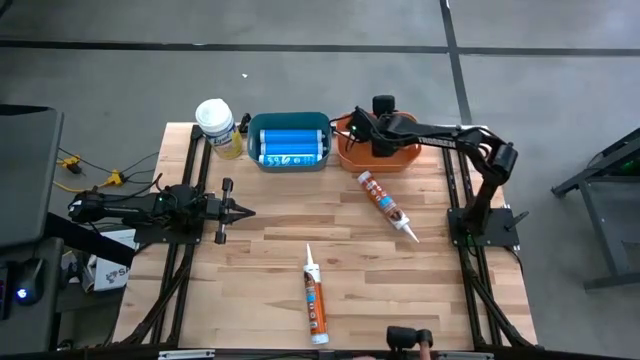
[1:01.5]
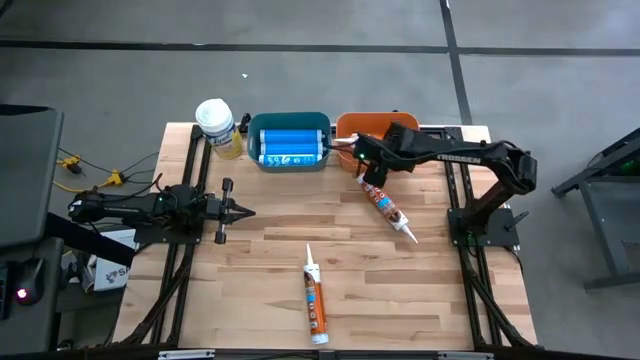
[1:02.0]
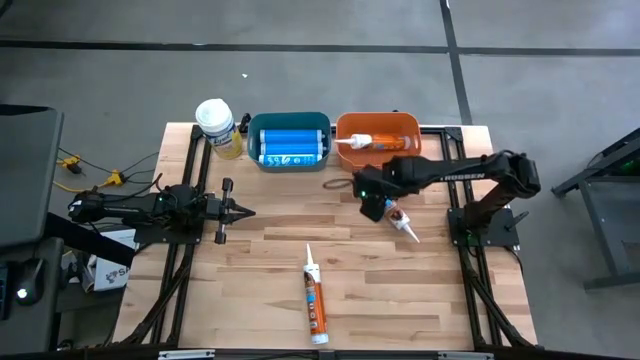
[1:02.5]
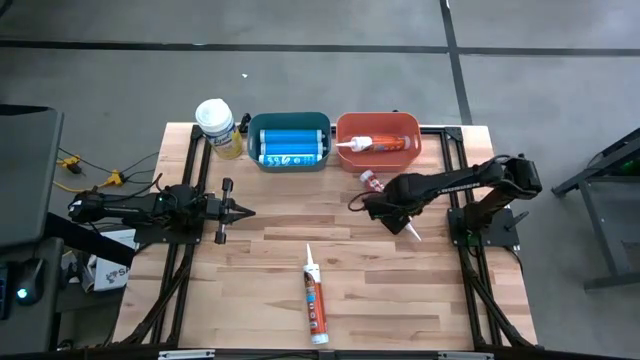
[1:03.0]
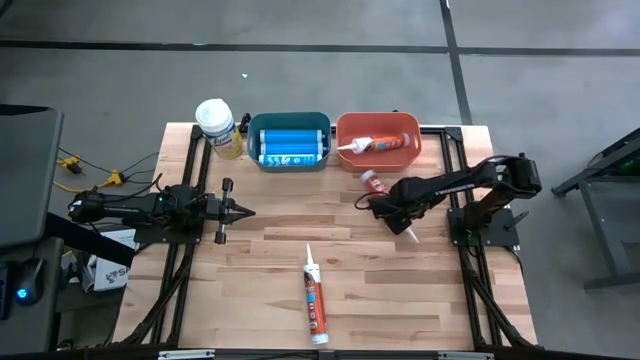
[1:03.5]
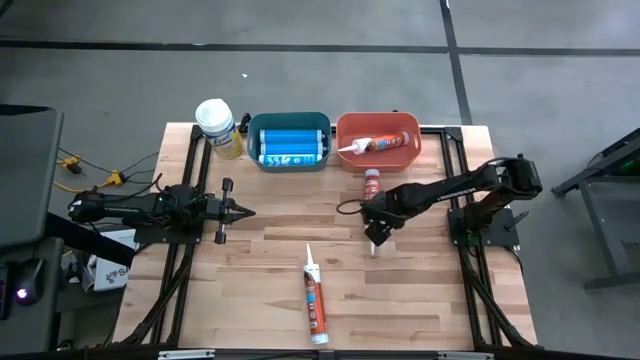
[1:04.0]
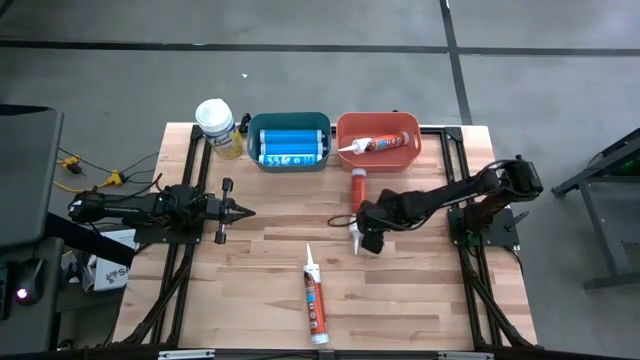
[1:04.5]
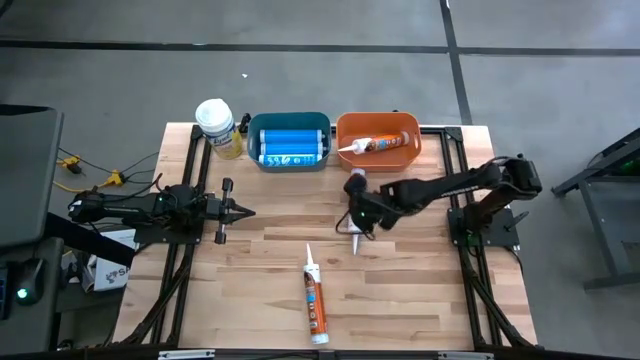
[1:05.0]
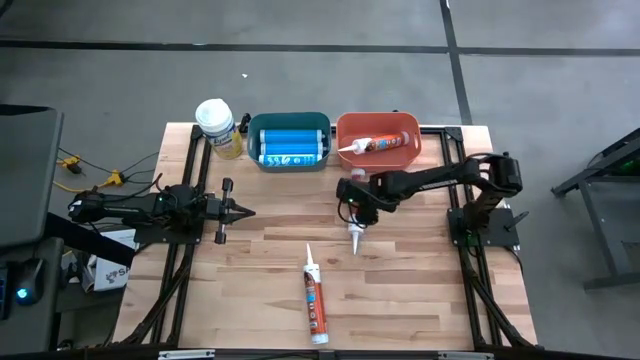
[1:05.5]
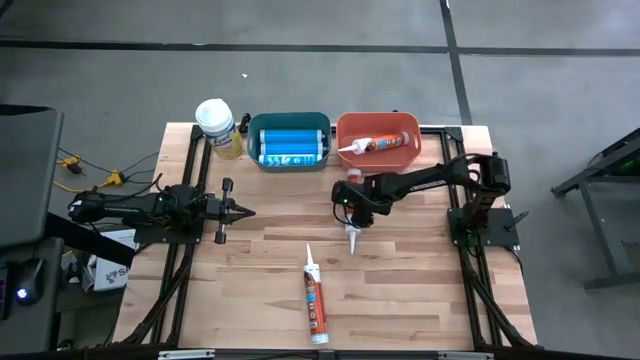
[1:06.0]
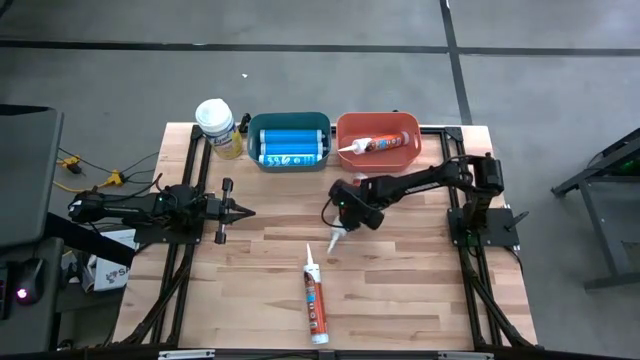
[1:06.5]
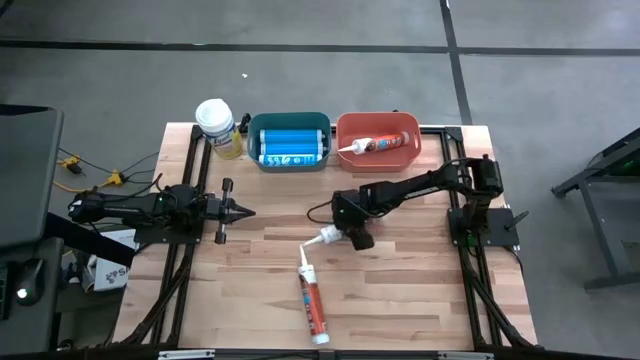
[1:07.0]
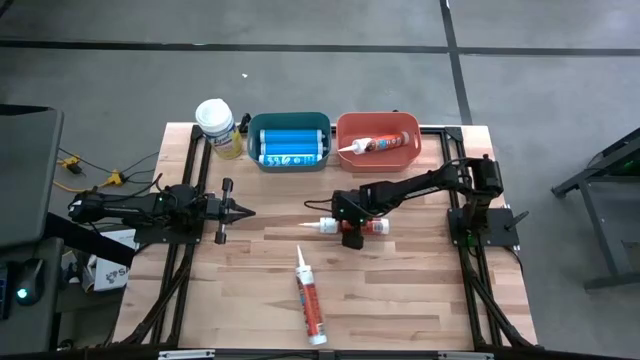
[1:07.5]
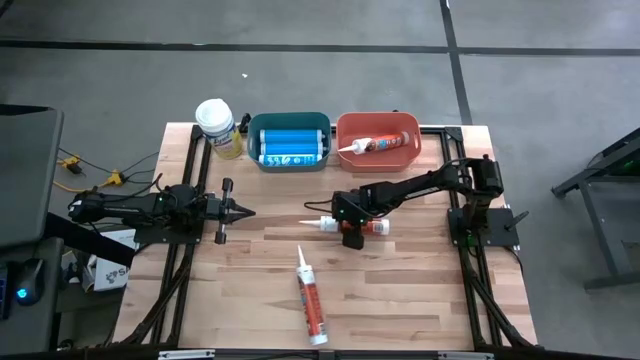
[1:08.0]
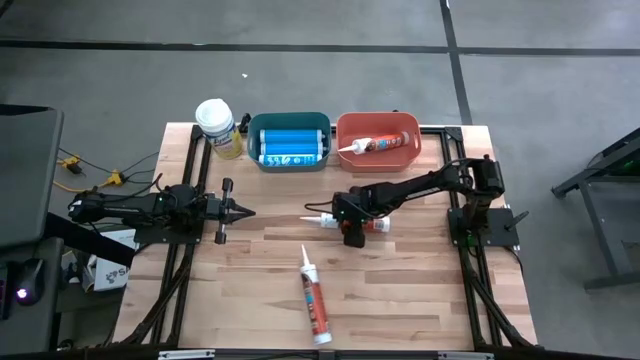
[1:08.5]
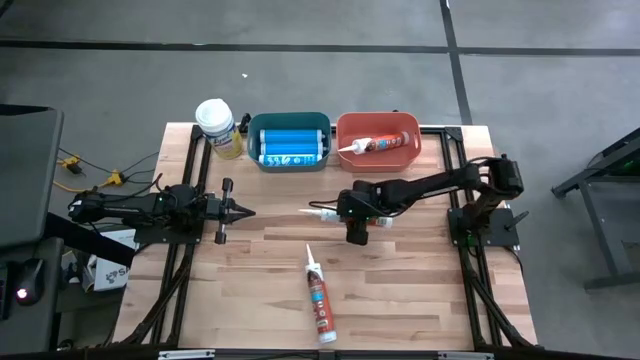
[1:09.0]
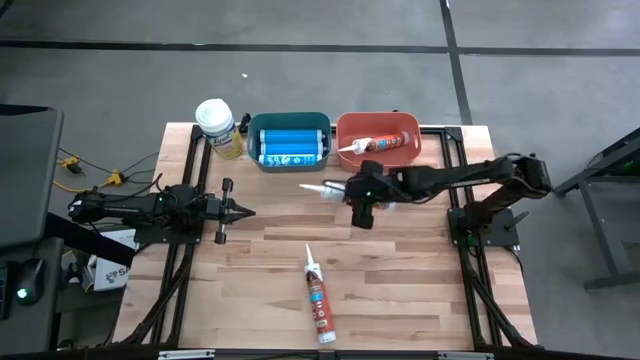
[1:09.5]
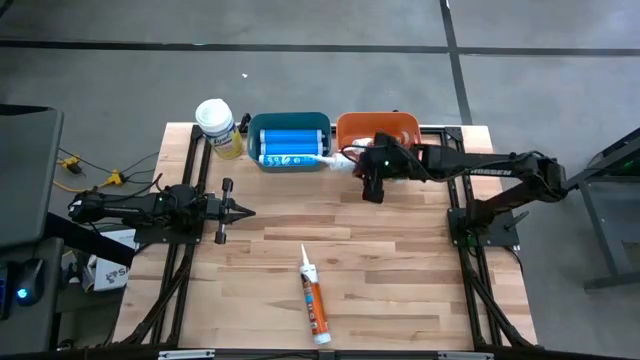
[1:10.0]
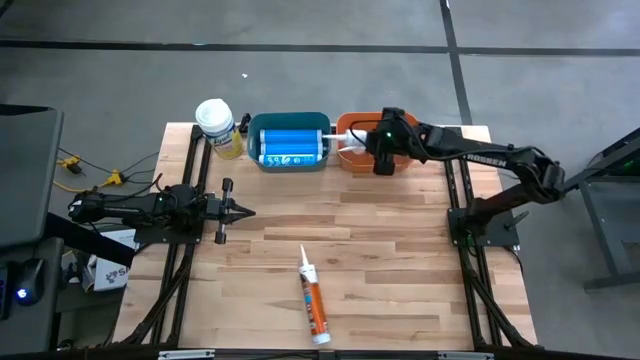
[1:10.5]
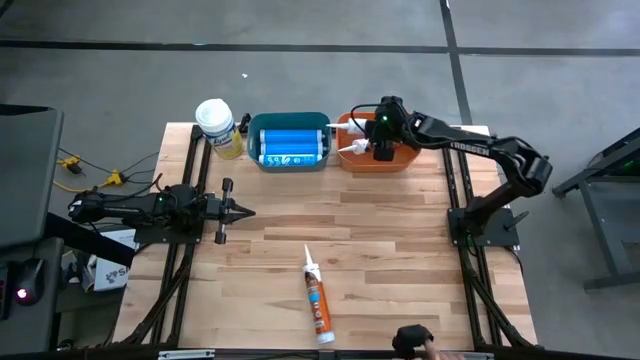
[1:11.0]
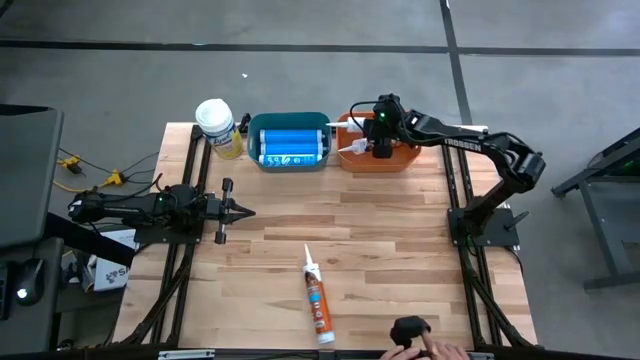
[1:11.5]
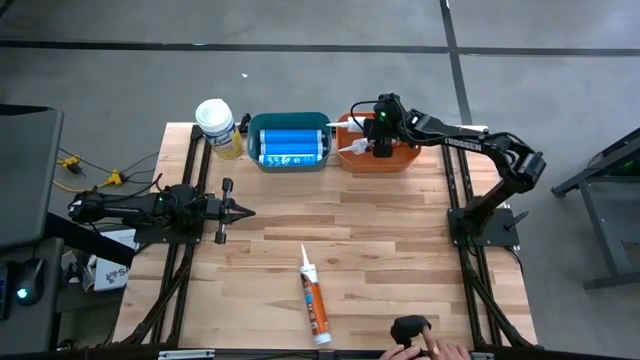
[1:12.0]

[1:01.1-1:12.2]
Task: Pick & place silicon tubes, Sealant and Lysol wipes
Put the top orange sealant into the orange bin

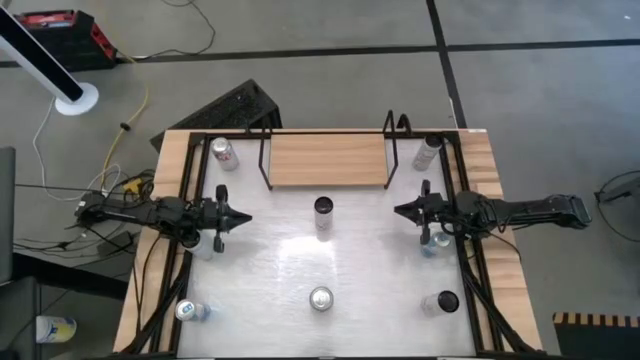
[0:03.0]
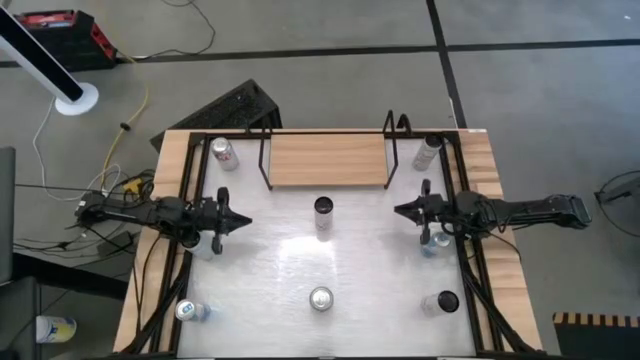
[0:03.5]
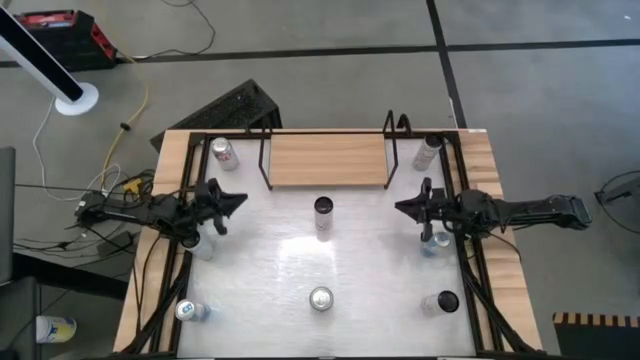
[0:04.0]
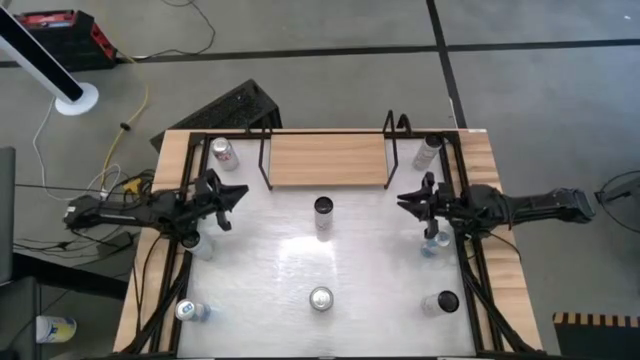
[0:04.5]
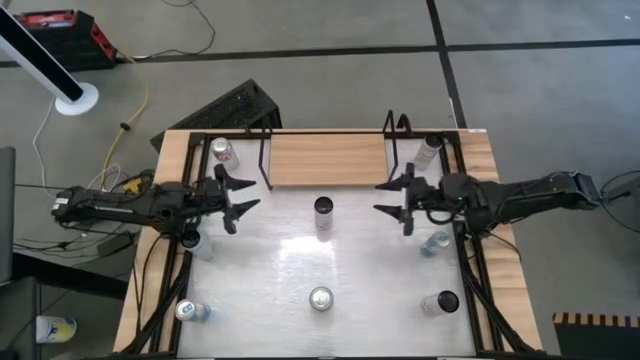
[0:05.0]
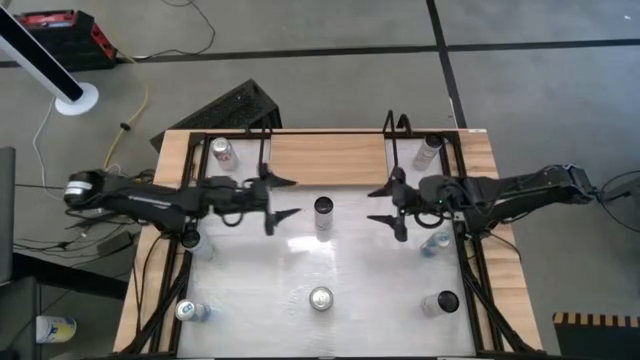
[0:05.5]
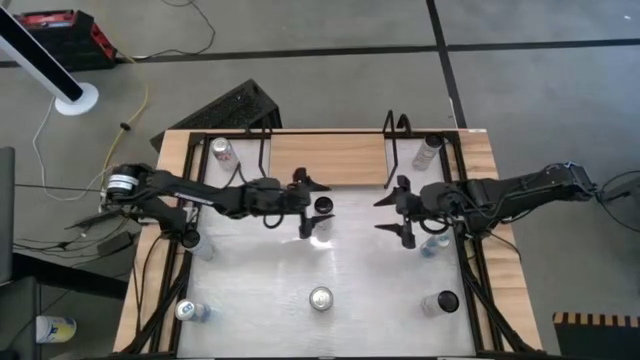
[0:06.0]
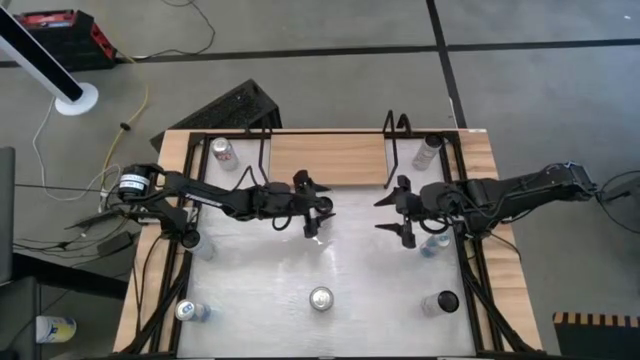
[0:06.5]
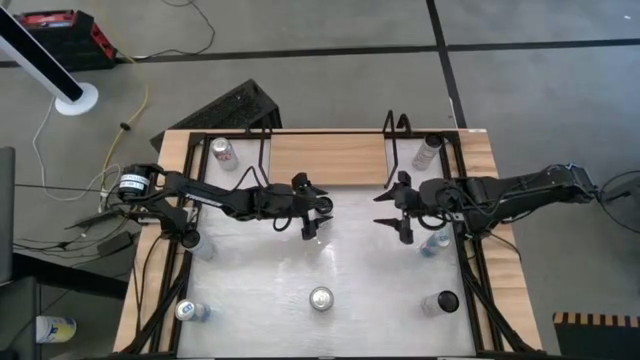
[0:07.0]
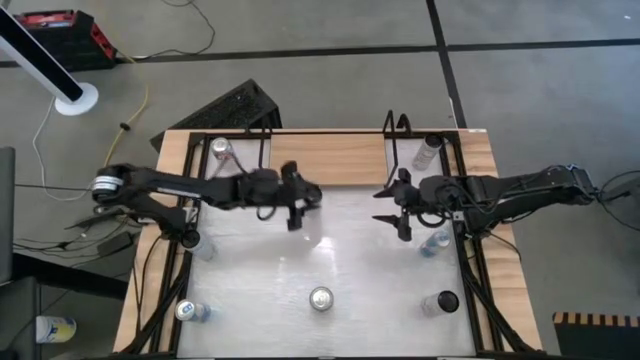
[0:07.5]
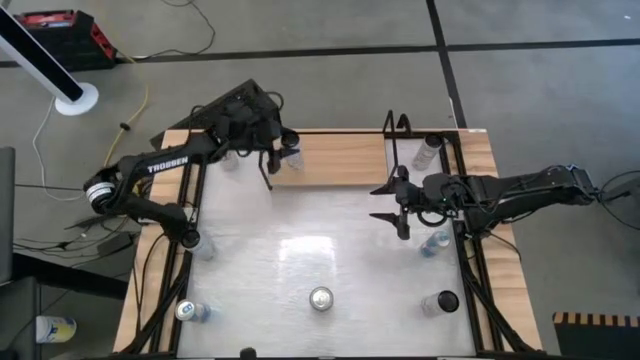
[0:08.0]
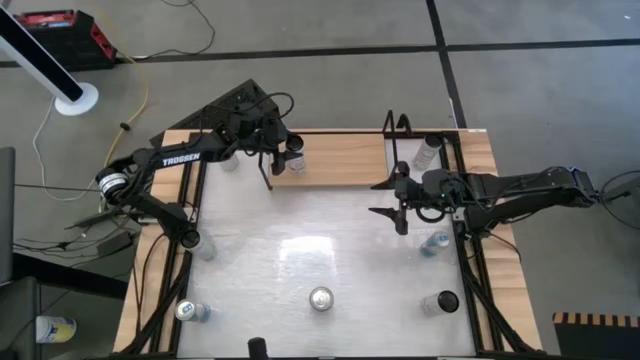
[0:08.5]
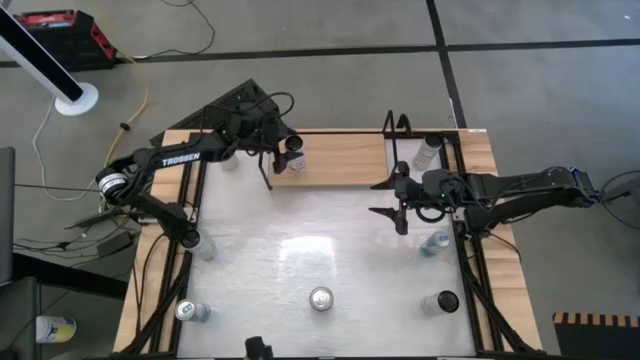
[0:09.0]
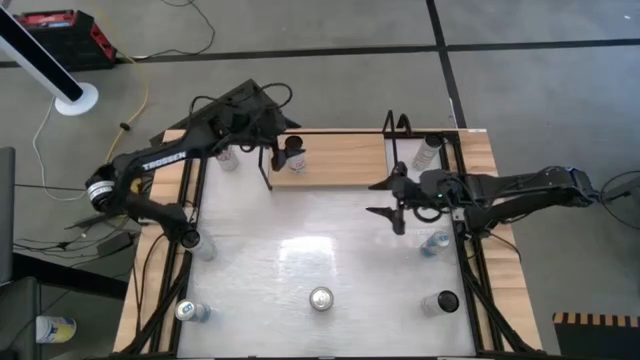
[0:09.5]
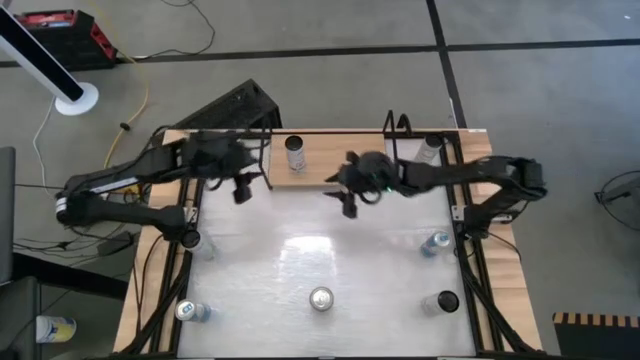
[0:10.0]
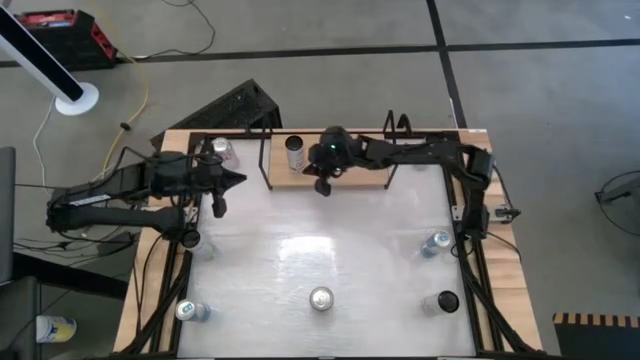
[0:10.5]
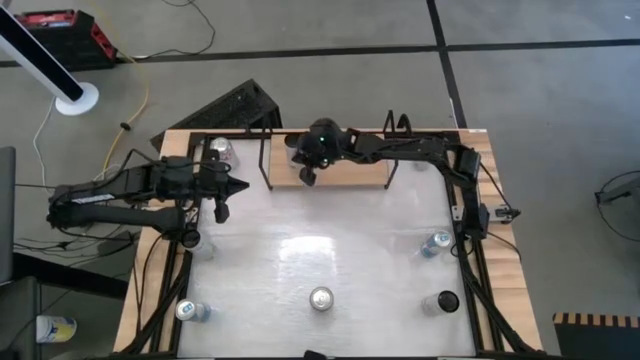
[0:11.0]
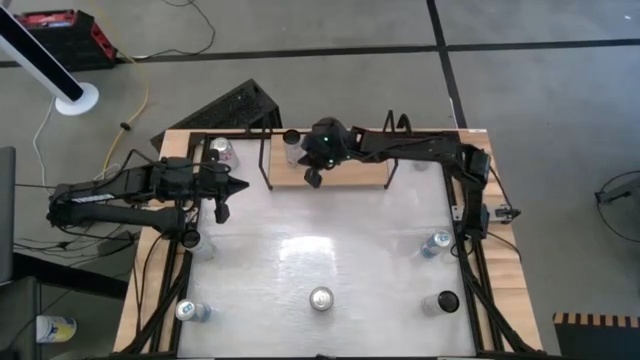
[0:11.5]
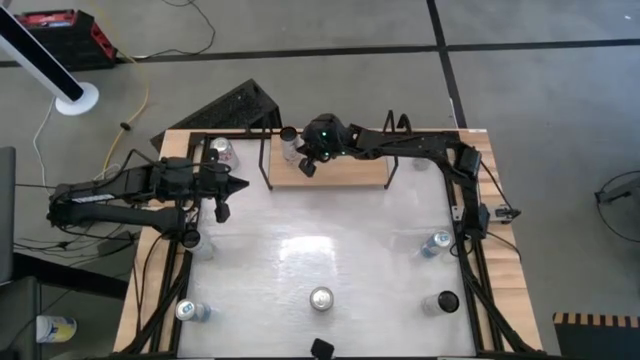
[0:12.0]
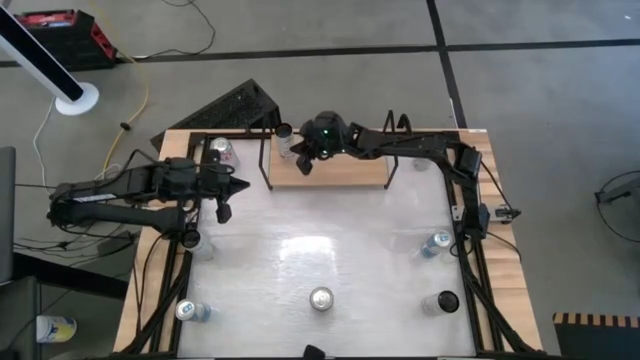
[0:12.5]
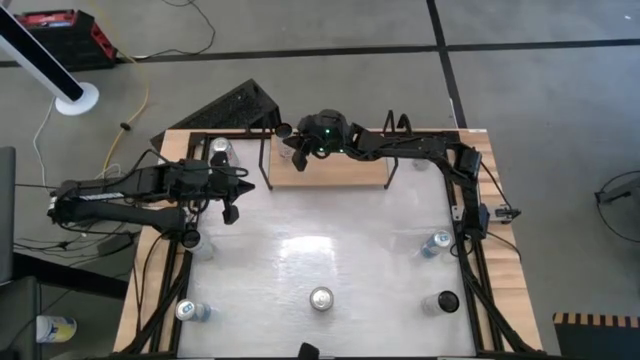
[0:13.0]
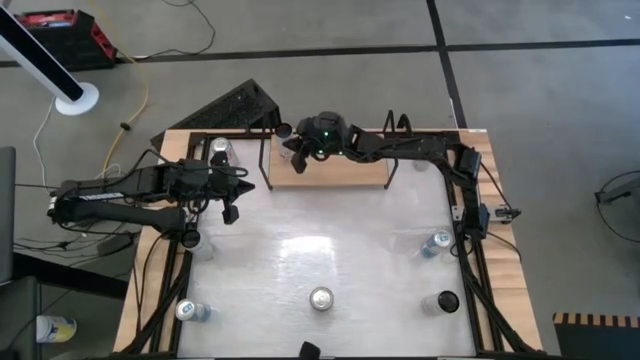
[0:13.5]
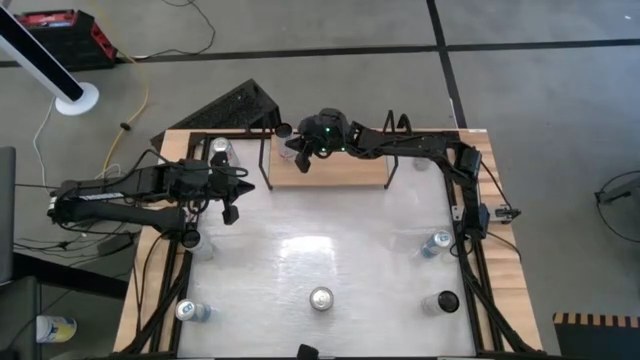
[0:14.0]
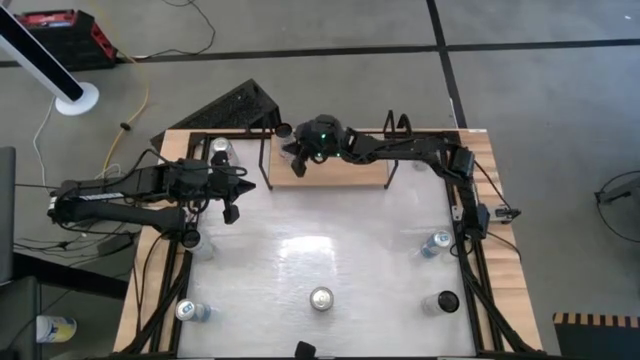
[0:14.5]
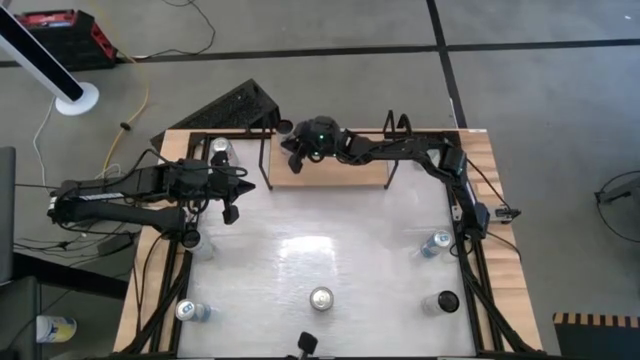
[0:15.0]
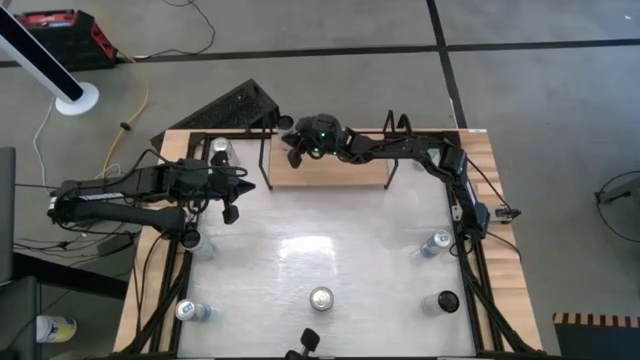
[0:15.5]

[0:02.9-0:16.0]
Task: Place canned beverage on shelf
Put the top white-pink soda can on the shelf
